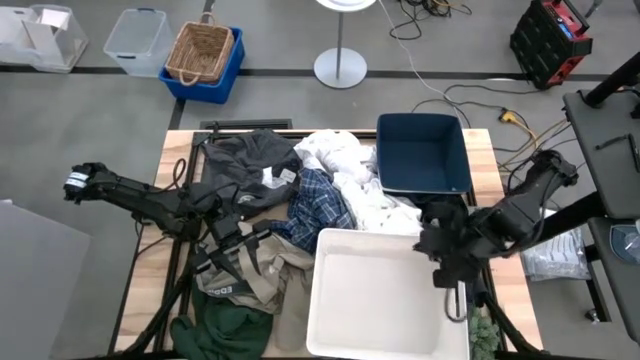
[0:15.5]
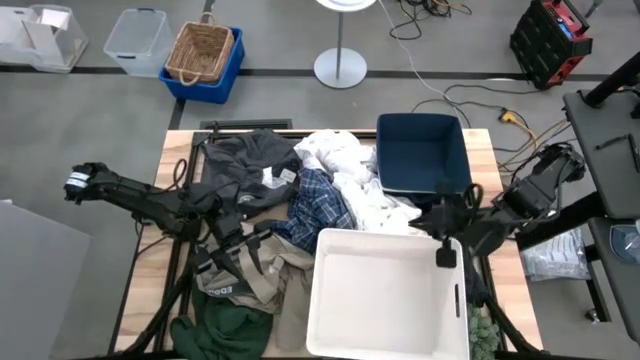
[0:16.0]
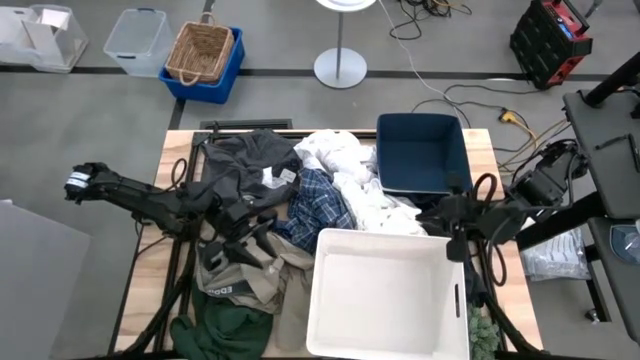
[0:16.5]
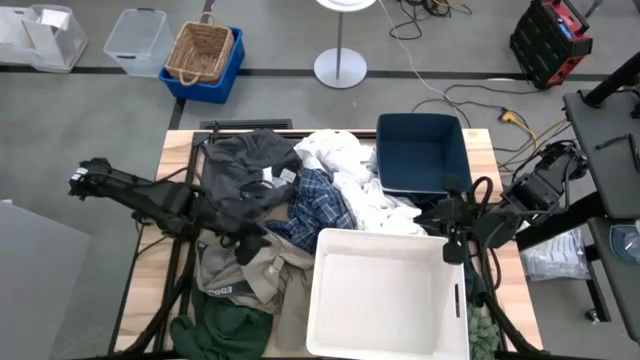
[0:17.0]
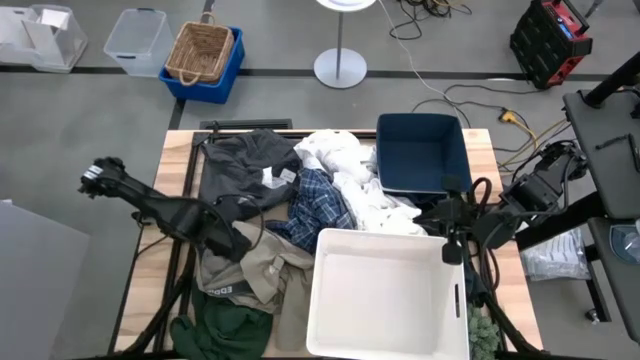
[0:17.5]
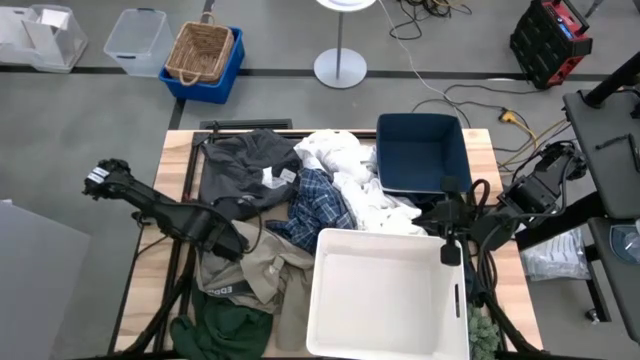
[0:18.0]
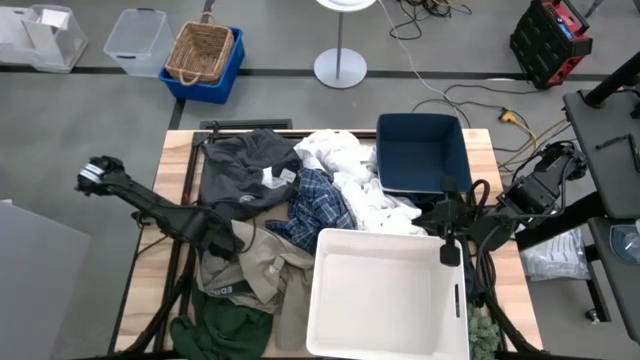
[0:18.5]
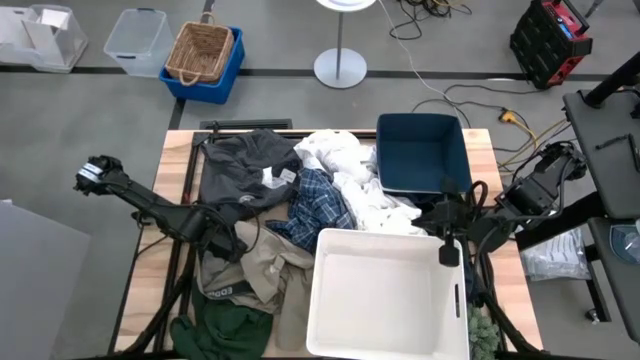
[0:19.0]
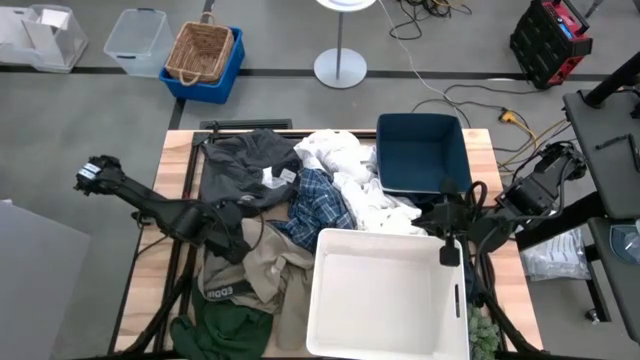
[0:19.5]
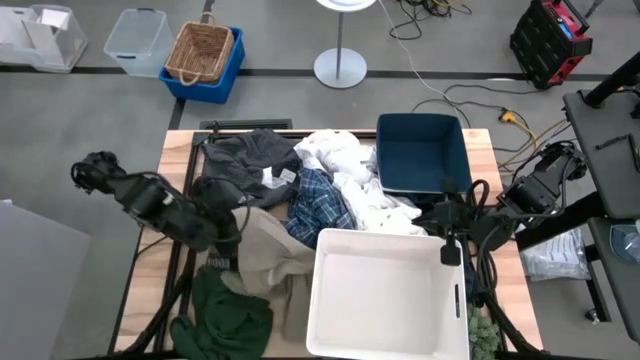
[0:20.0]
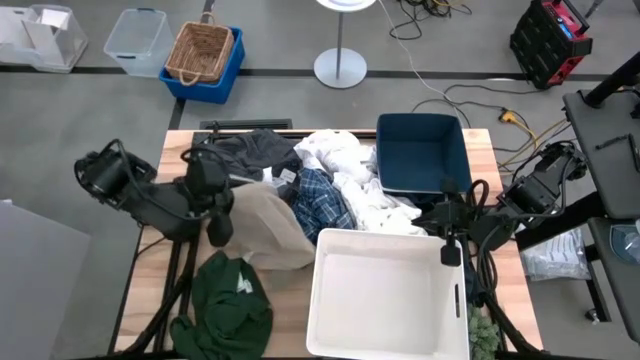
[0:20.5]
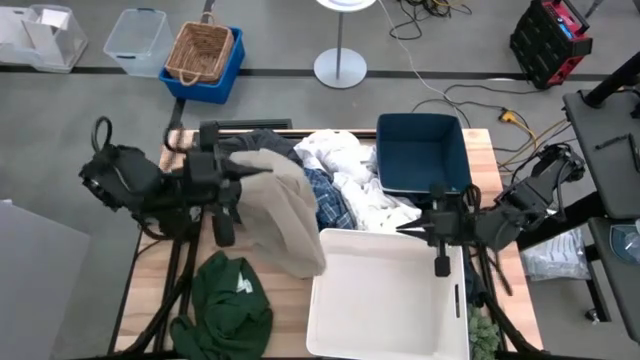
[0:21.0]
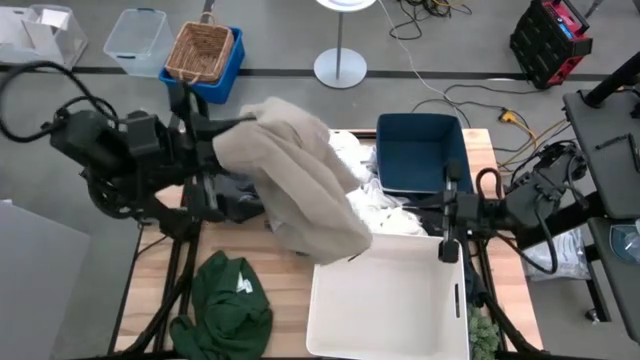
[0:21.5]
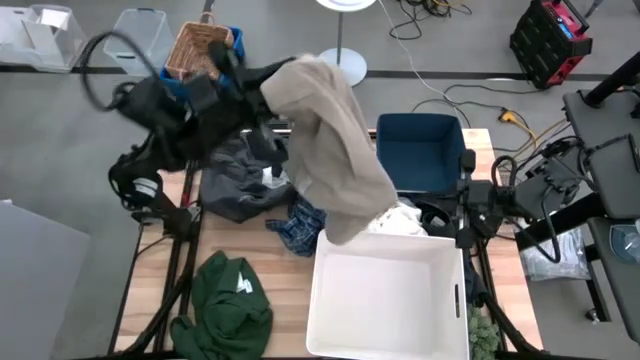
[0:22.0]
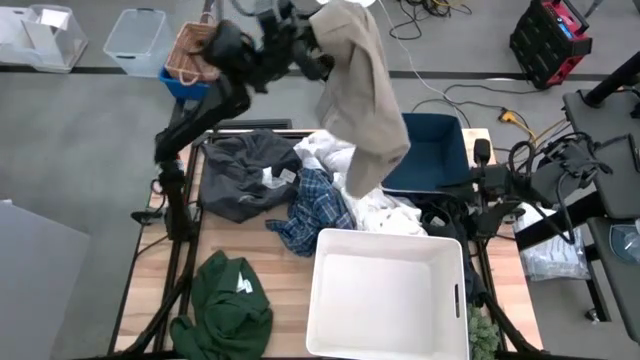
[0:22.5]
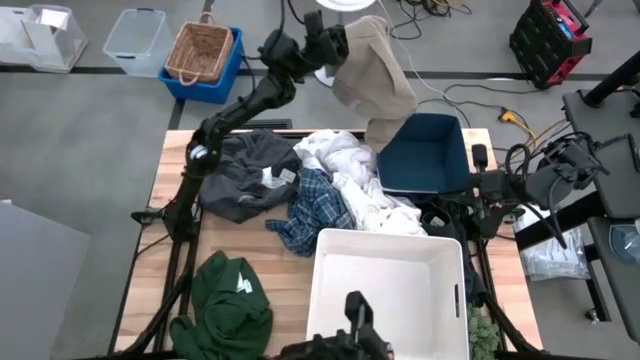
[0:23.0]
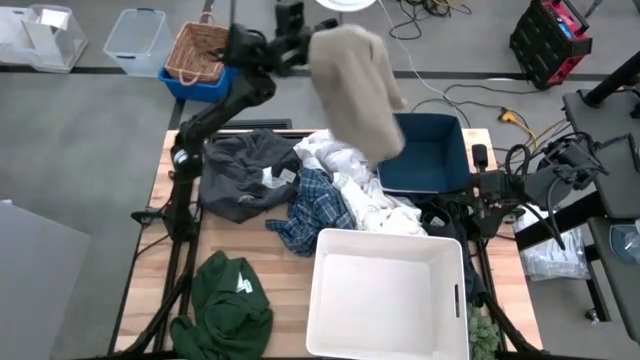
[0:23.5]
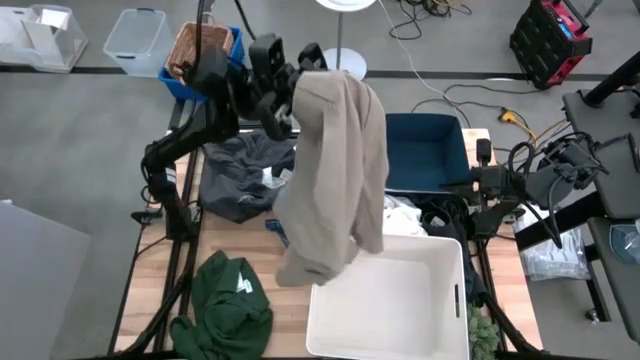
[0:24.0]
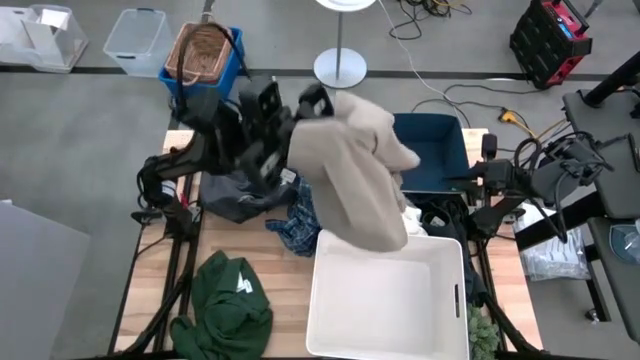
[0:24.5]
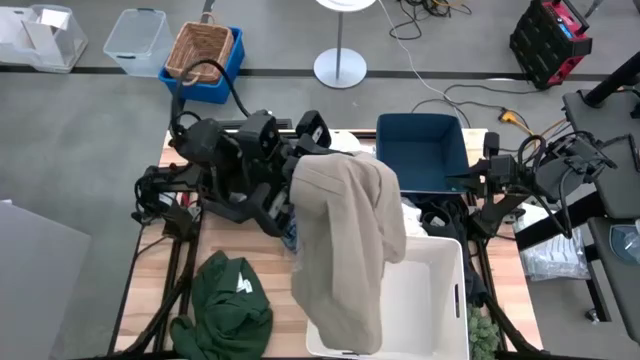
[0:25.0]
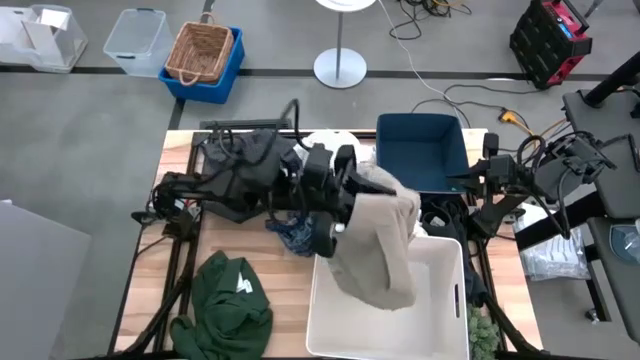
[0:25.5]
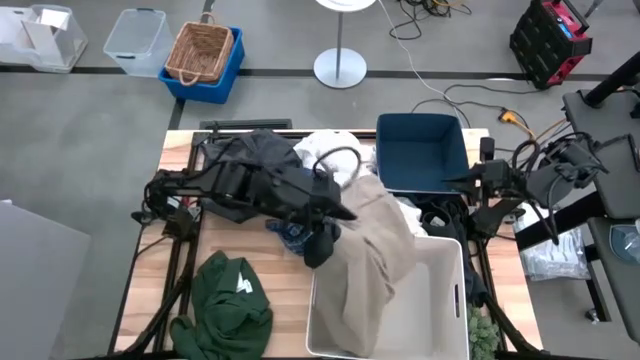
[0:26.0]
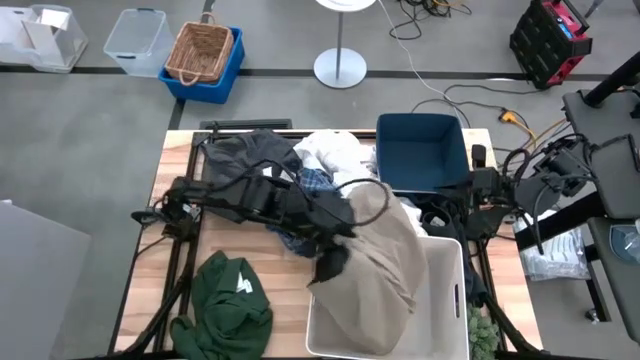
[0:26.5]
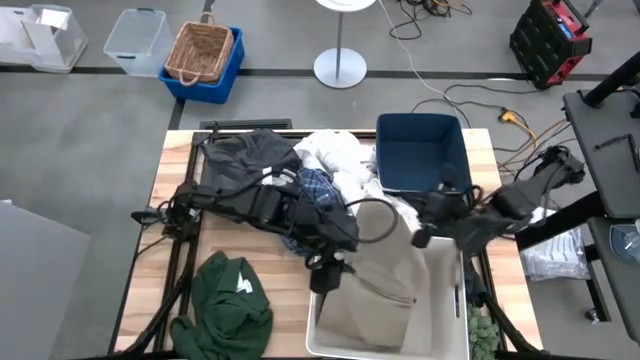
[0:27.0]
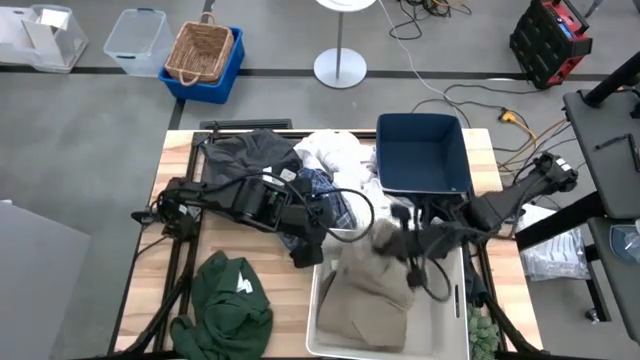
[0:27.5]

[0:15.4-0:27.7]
Task: Sort clothes
Put the brown shorts into the white bin
